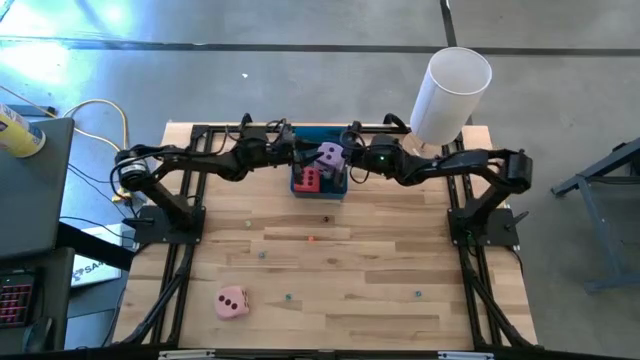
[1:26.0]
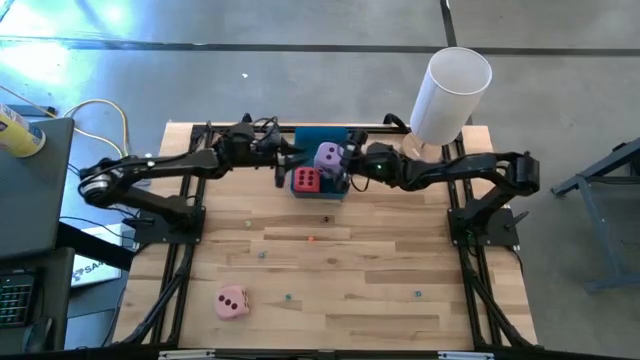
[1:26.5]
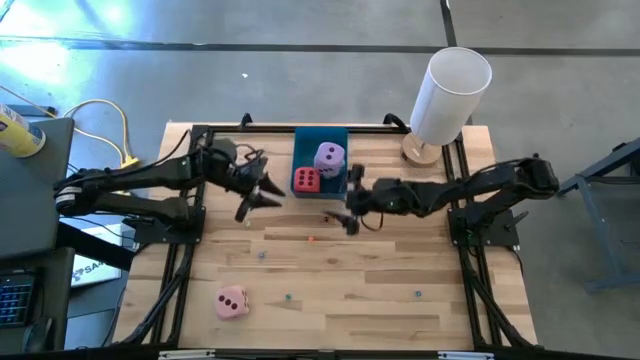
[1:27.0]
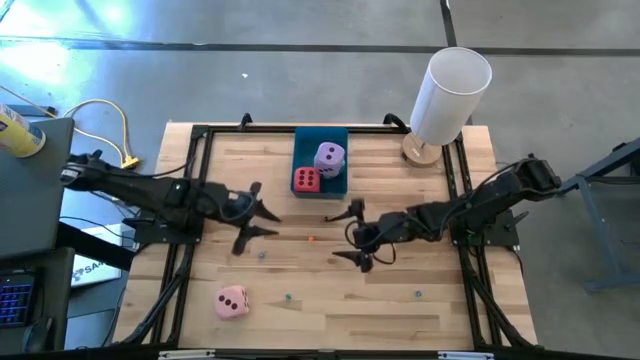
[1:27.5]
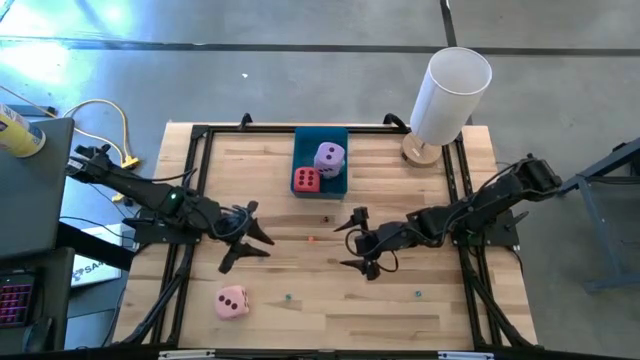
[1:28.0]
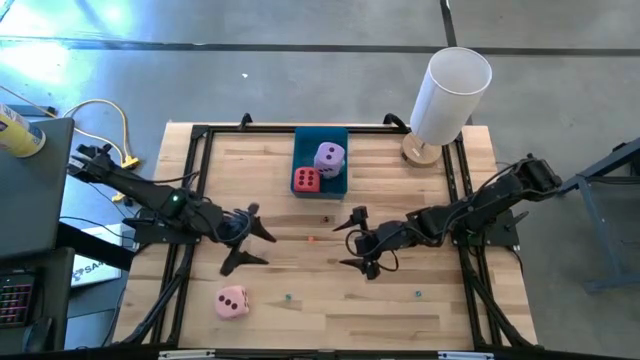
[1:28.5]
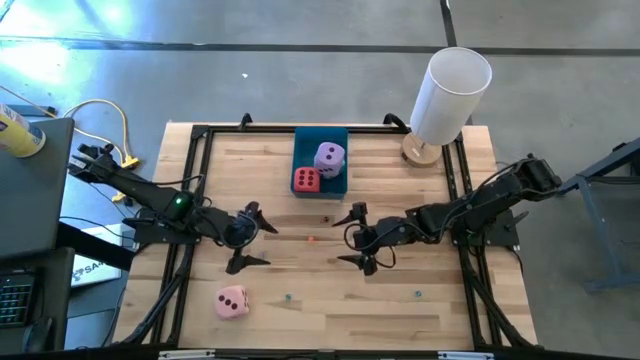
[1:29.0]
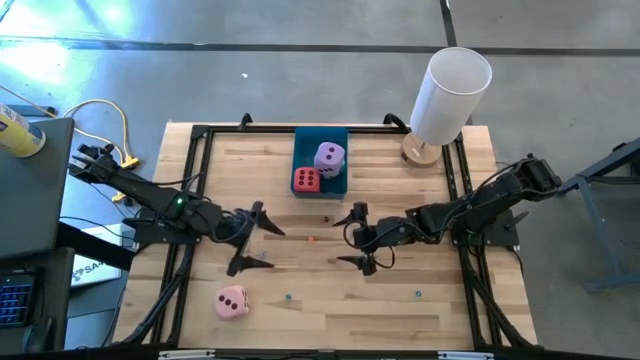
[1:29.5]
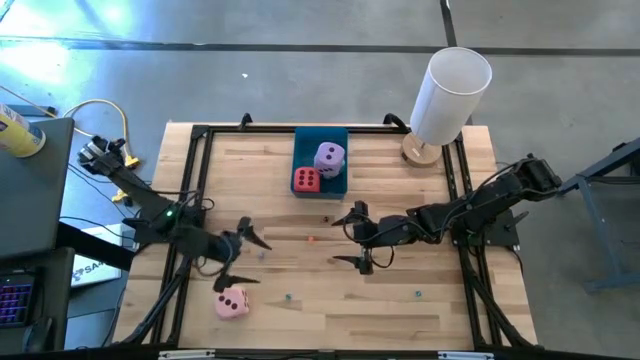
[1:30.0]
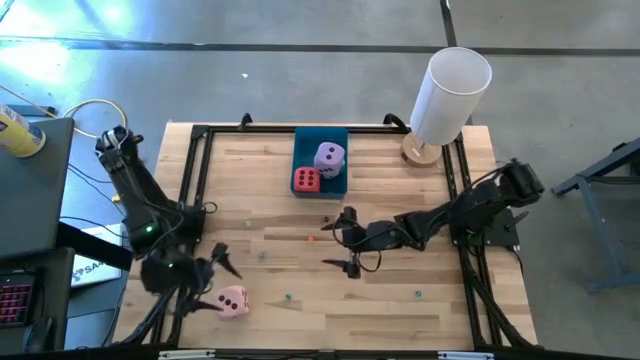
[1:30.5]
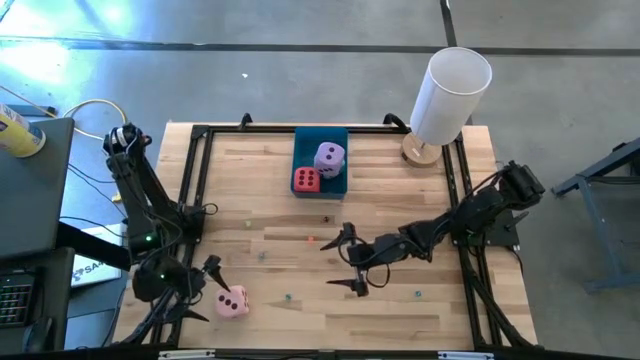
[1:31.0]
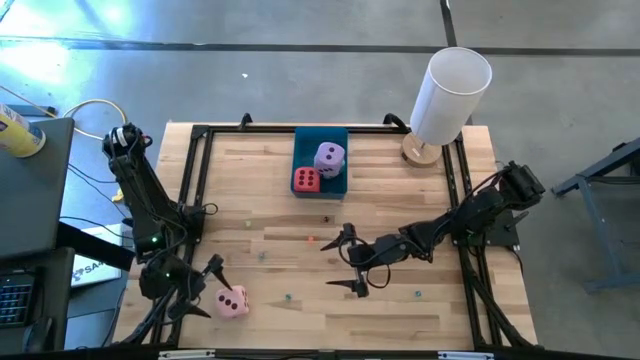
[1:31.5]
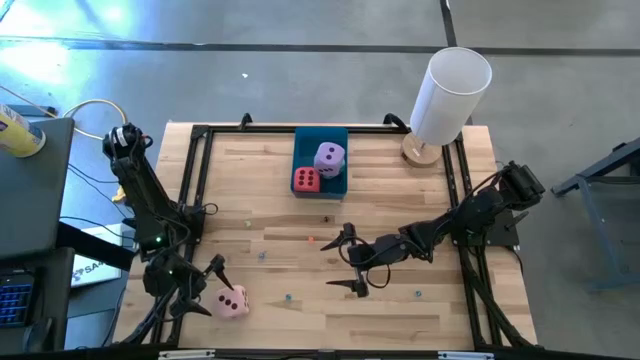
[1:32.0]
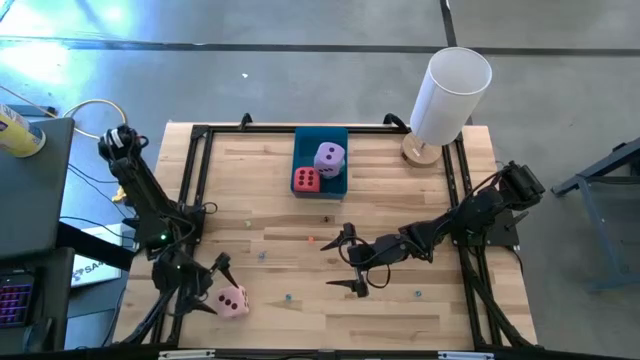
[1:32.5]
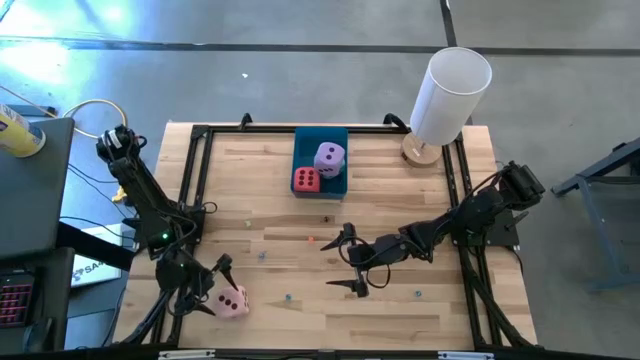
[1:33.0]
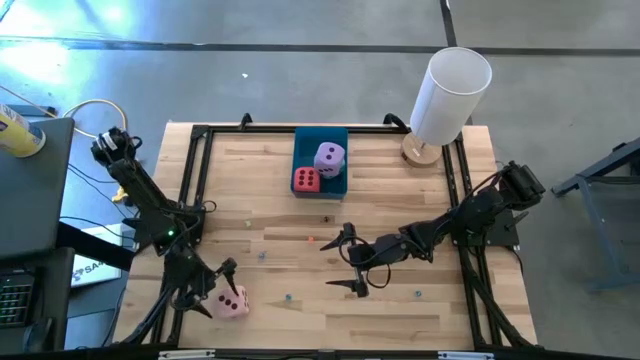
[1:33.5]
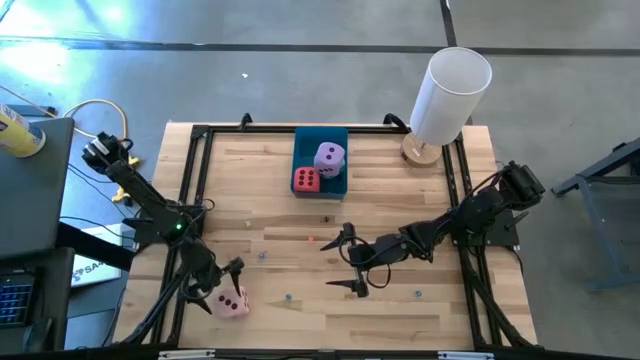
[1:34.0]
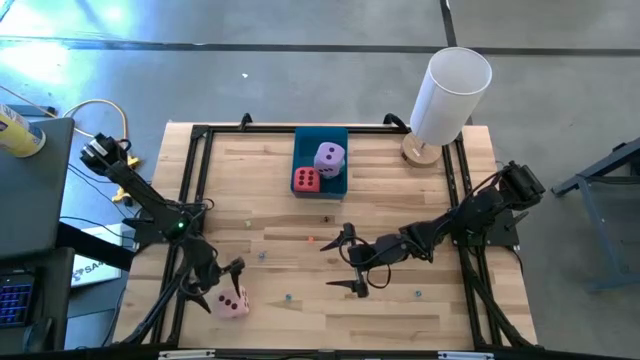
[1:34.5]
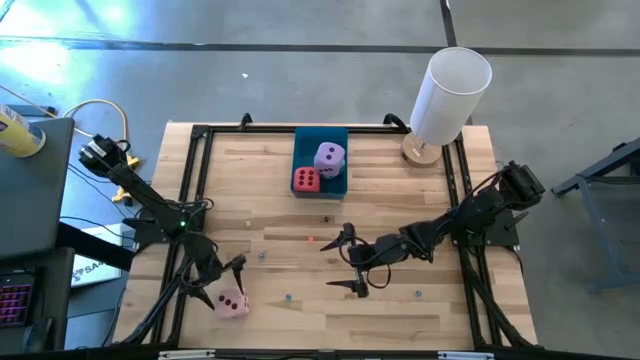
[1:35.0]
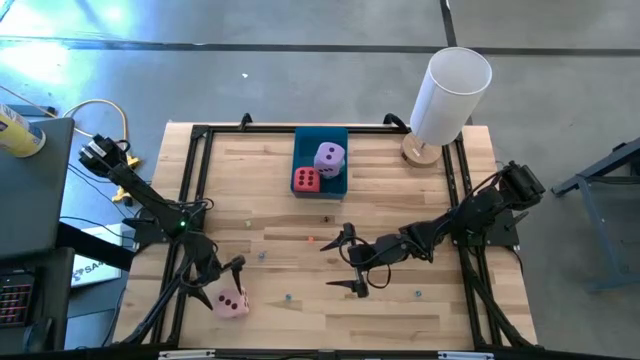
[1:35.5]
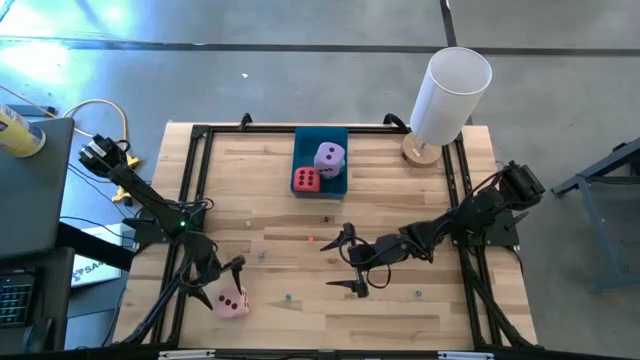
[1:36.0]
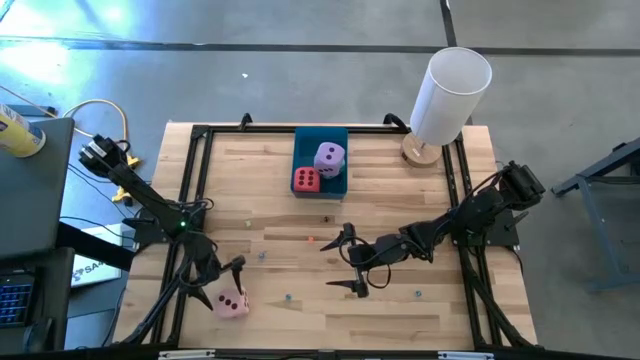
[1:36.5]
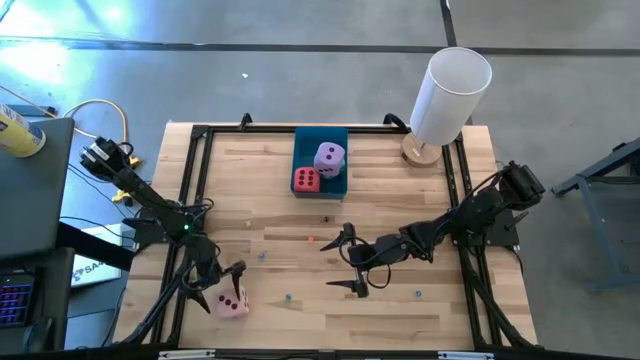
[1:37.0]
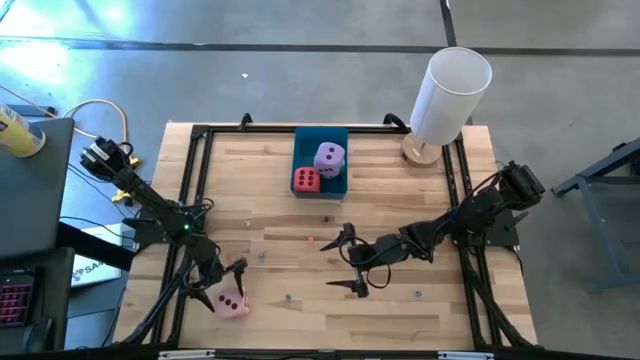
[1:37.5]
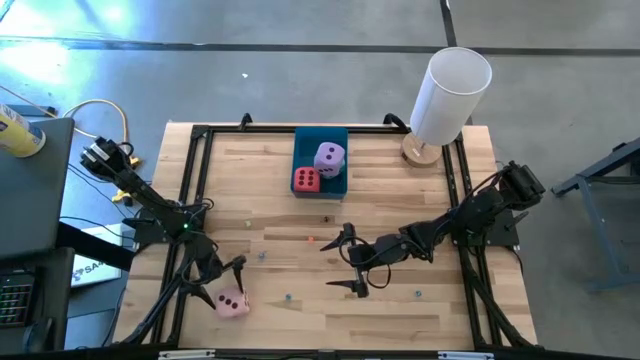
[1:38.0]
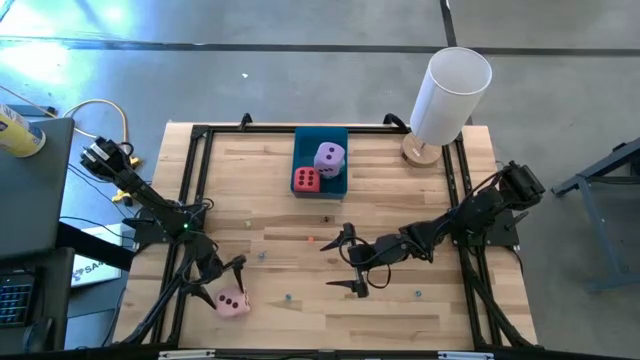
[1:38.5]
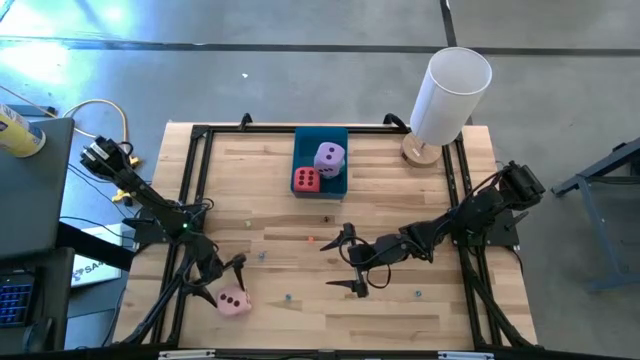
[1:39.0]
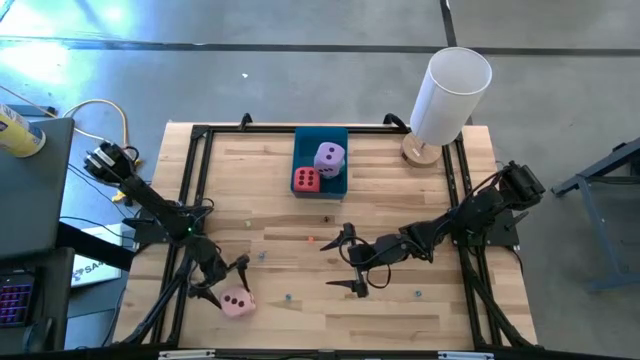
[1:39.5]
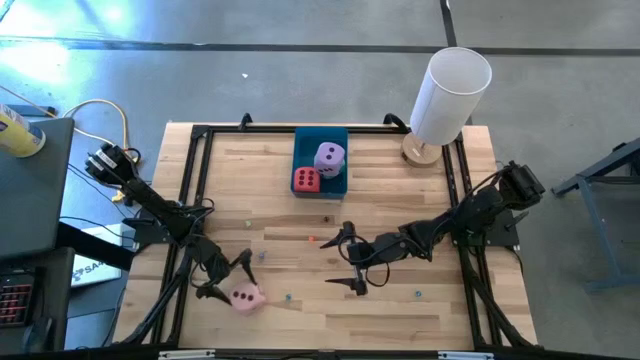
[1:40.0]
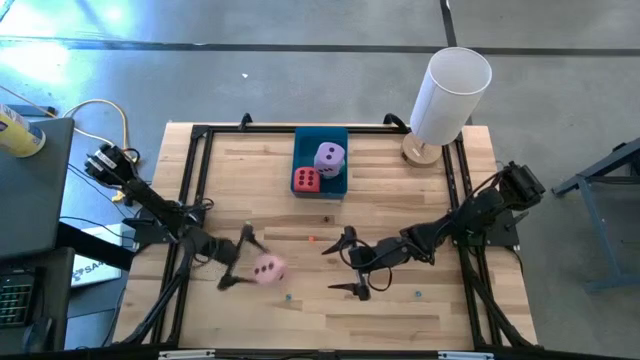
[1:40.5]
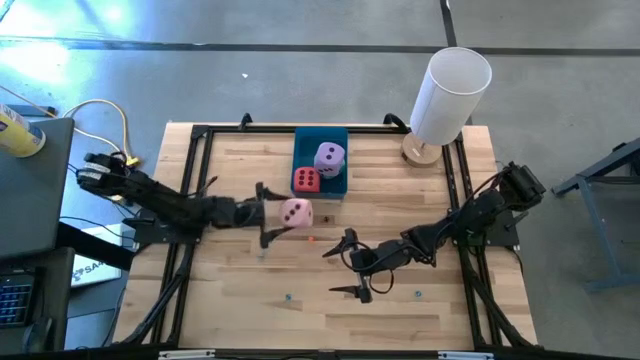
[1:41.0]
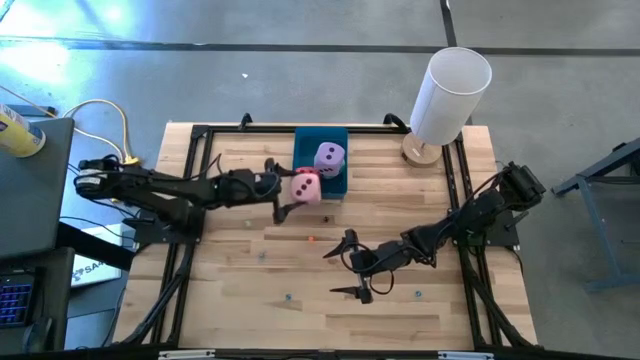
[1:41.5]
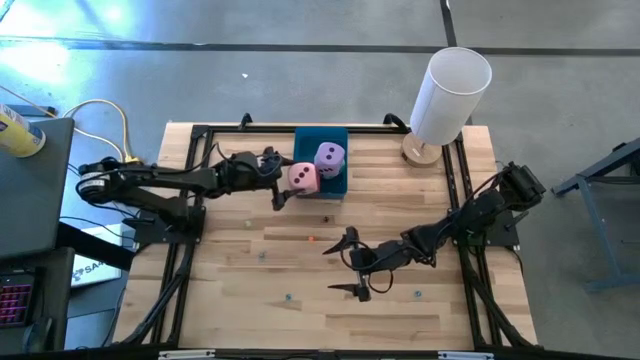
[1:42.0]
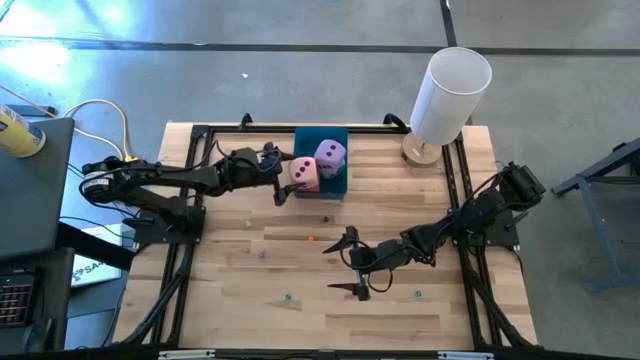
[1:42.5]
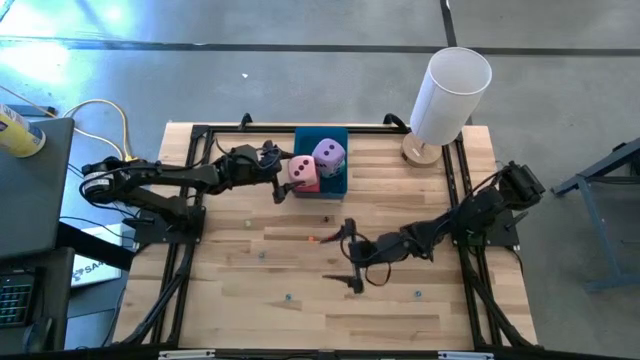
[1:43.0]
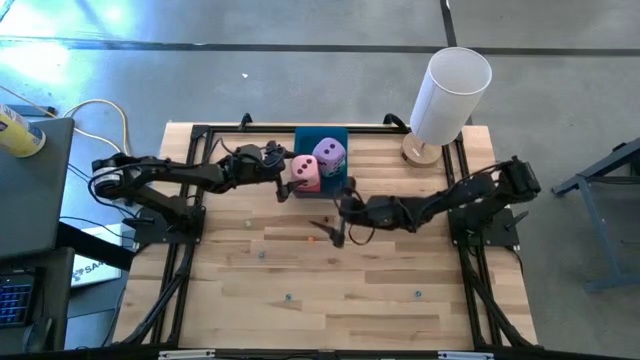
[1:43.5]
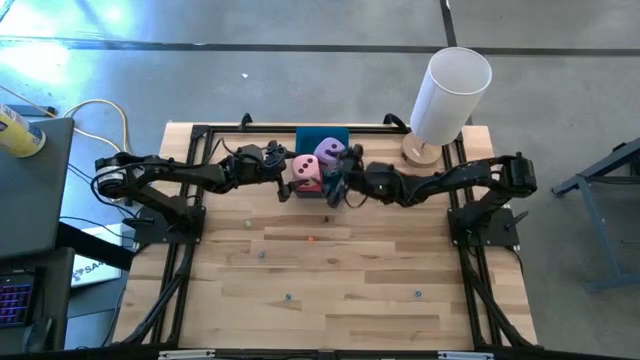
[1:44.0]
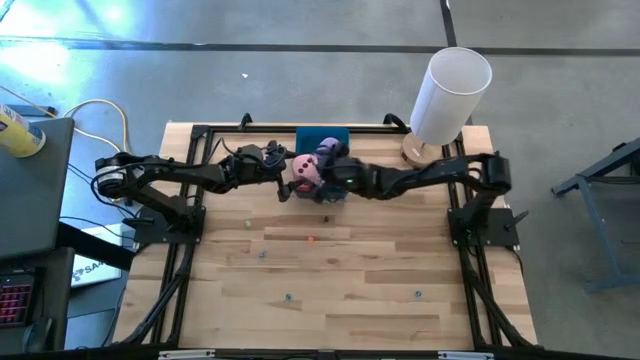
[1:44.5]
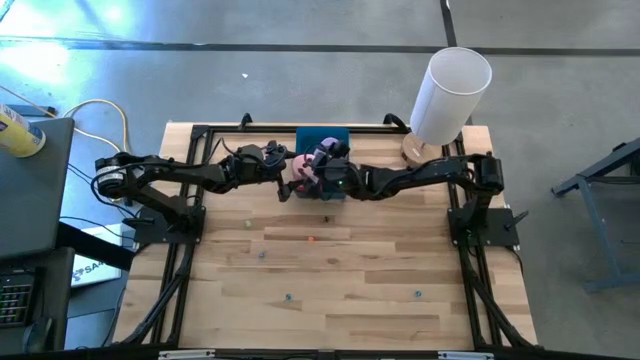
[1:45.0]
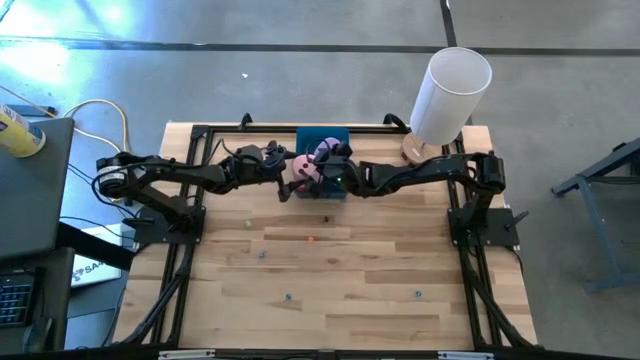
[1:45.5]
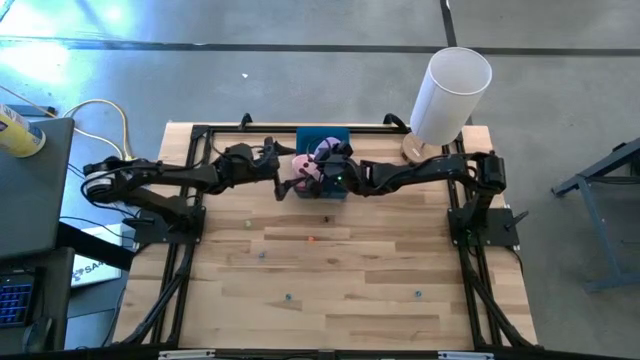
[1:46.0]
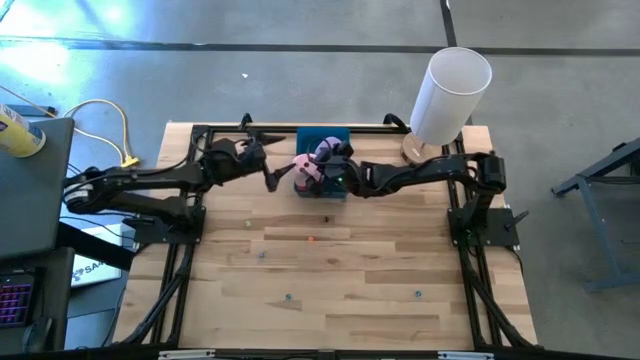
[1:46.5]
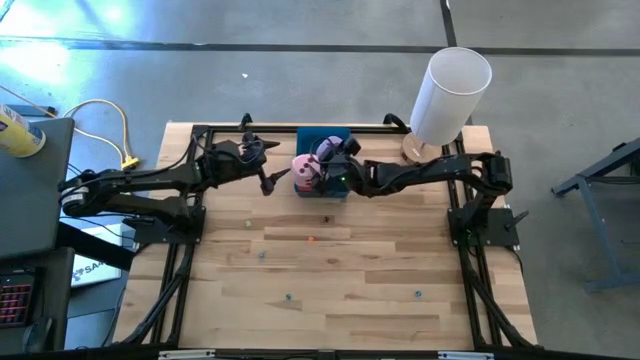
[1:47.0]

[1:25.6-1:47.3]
Task: Pick & Place Dice
Put the pink die into the blue bin
